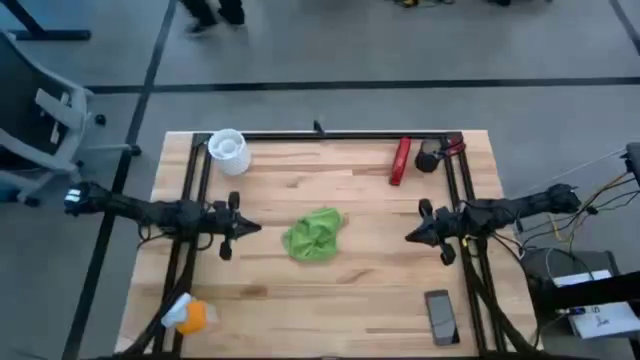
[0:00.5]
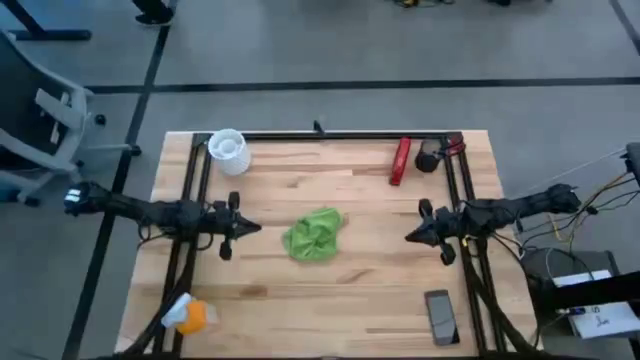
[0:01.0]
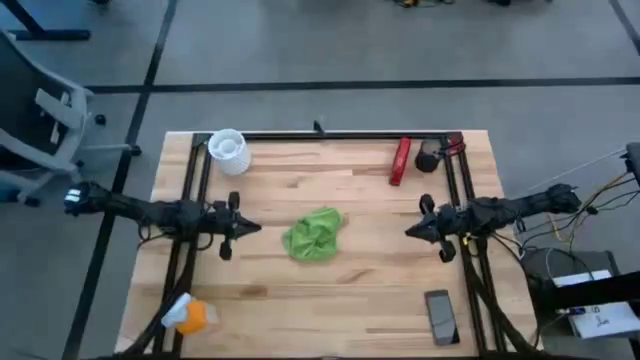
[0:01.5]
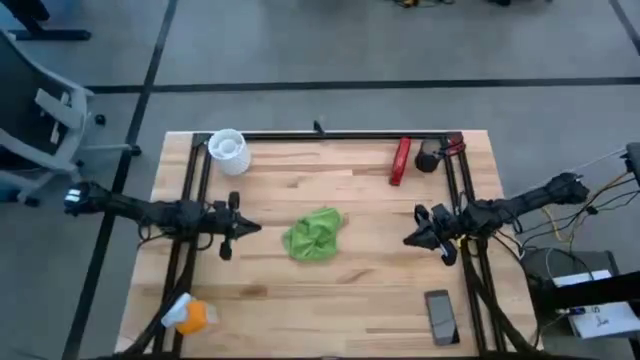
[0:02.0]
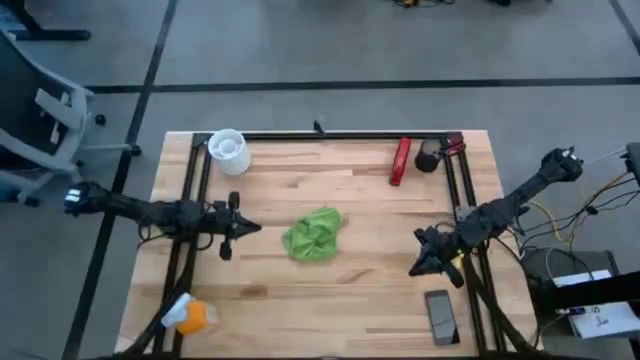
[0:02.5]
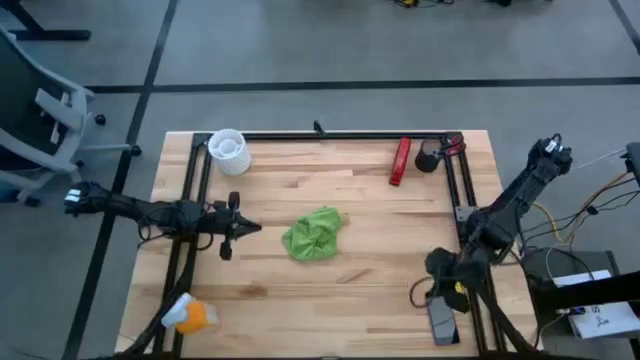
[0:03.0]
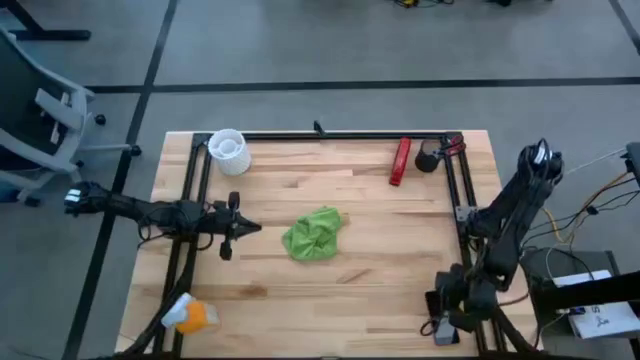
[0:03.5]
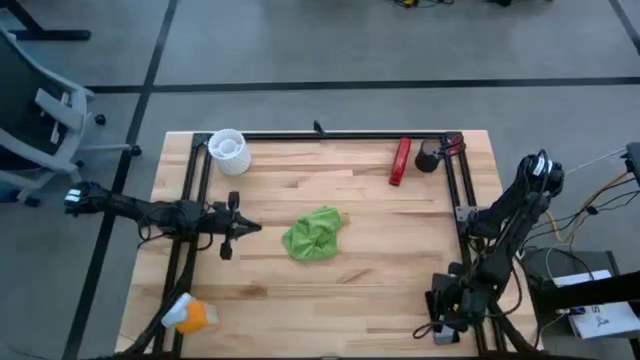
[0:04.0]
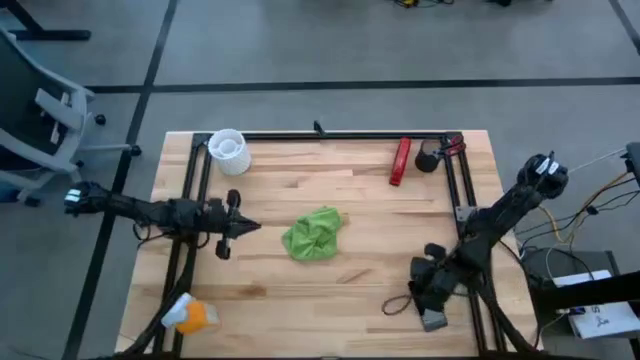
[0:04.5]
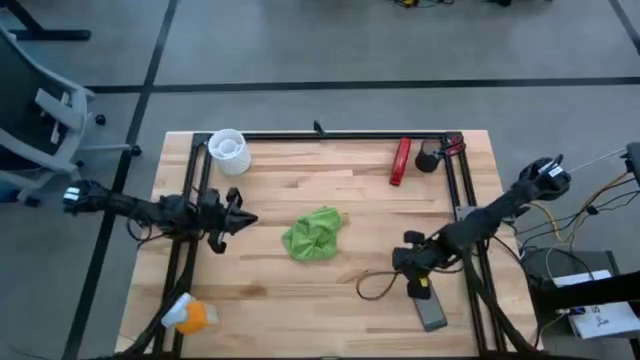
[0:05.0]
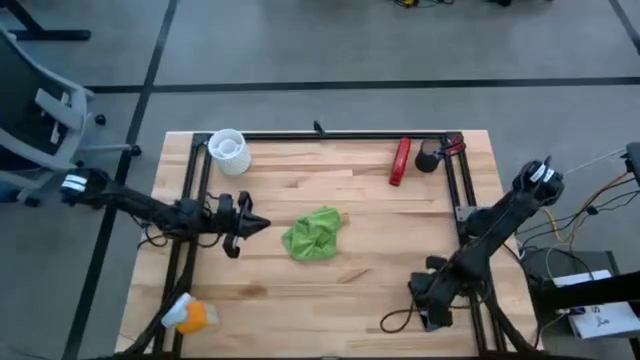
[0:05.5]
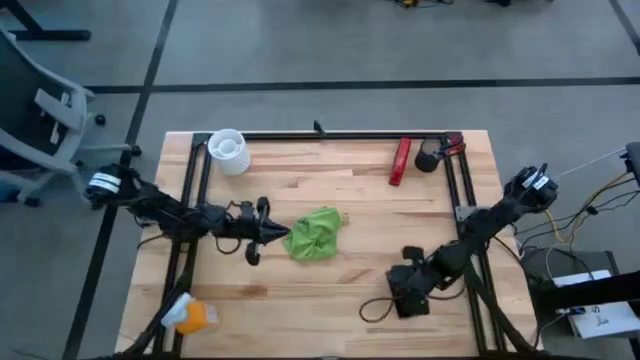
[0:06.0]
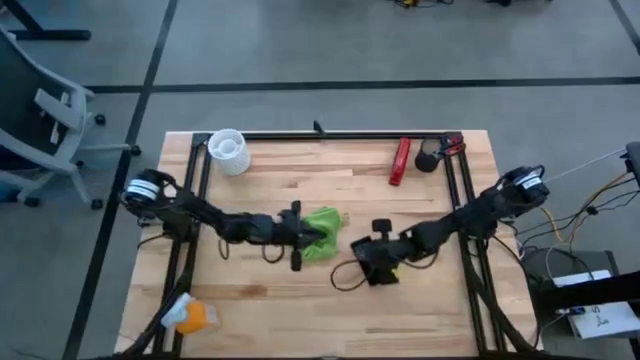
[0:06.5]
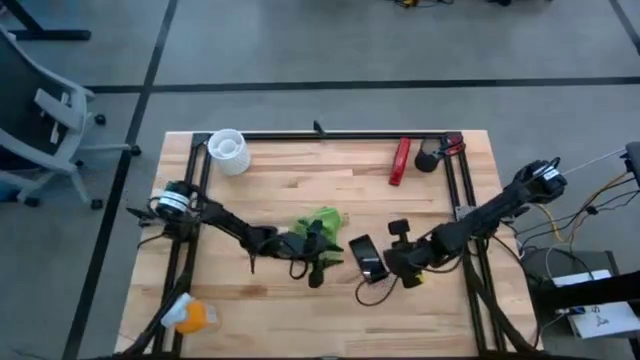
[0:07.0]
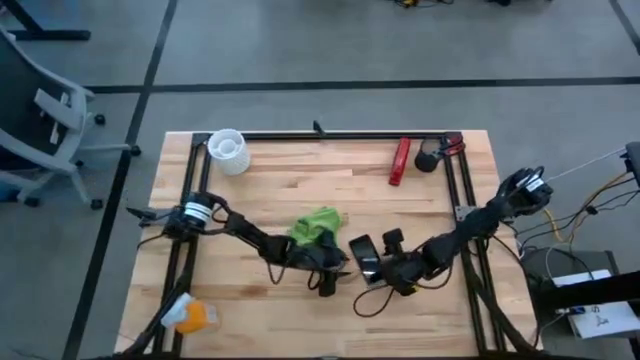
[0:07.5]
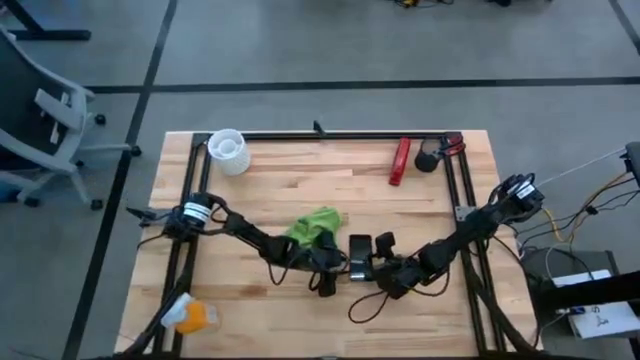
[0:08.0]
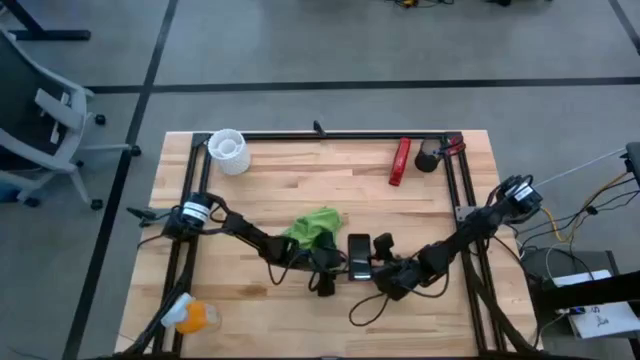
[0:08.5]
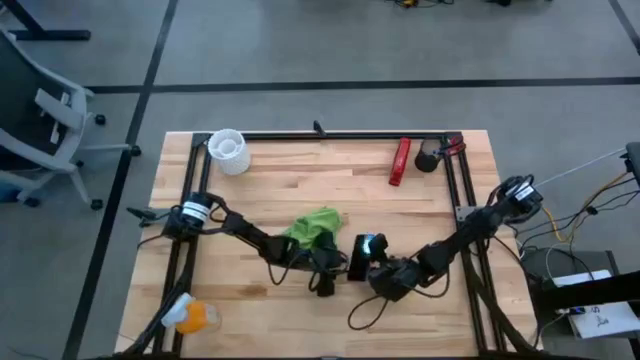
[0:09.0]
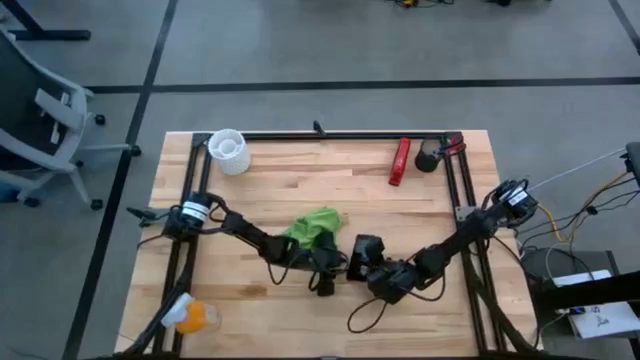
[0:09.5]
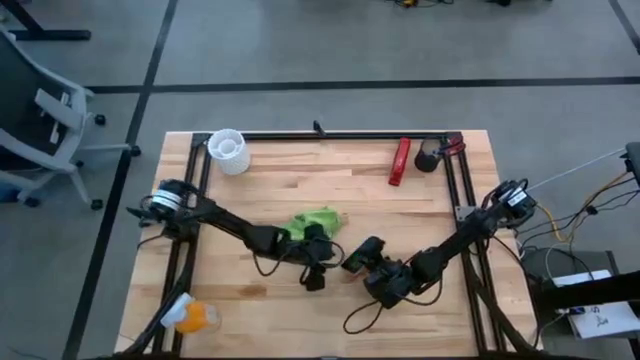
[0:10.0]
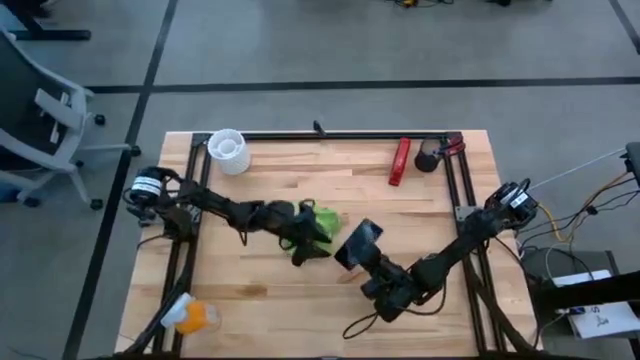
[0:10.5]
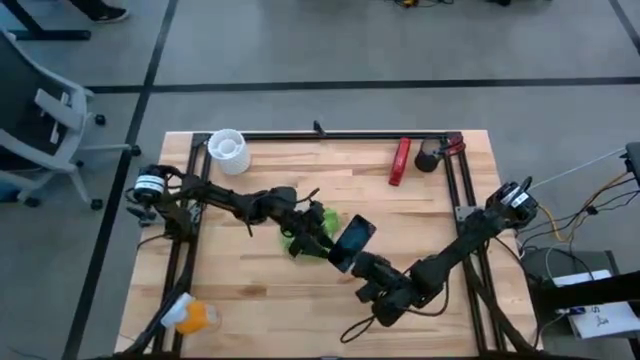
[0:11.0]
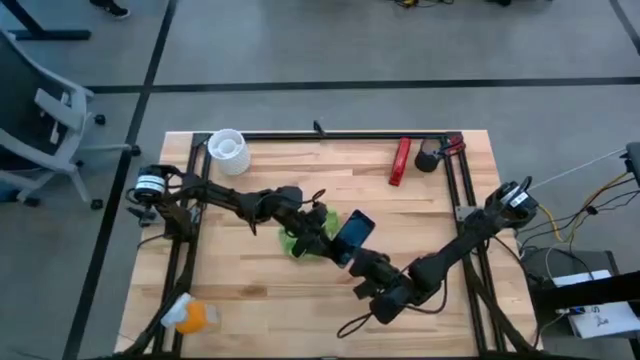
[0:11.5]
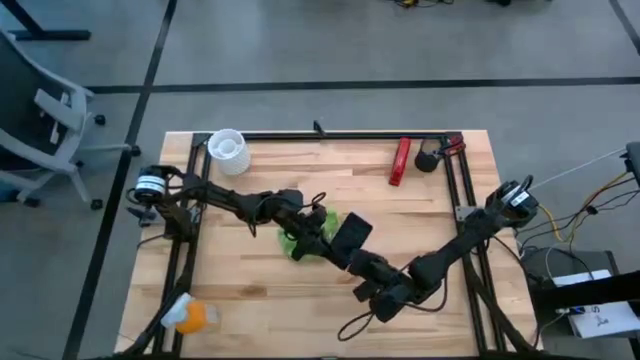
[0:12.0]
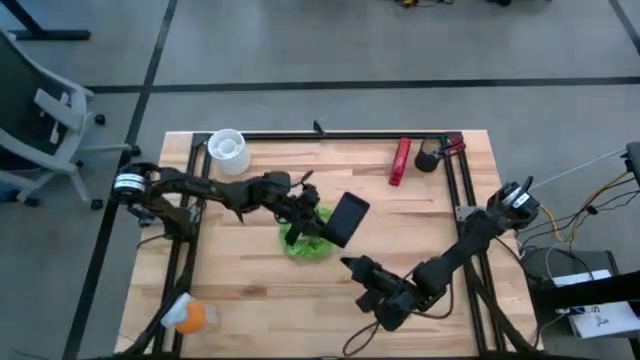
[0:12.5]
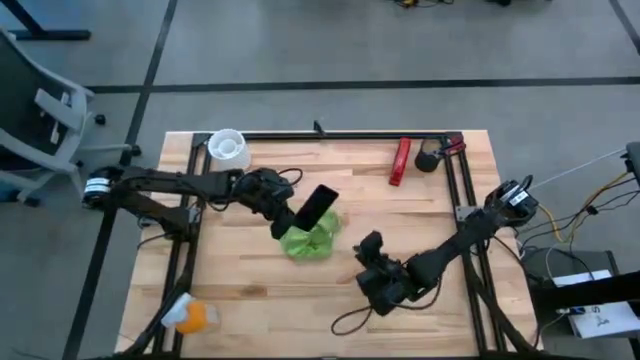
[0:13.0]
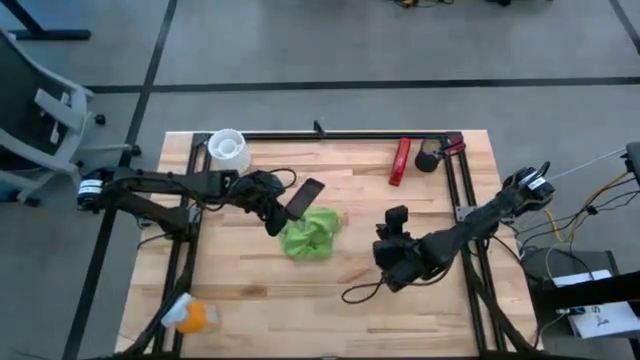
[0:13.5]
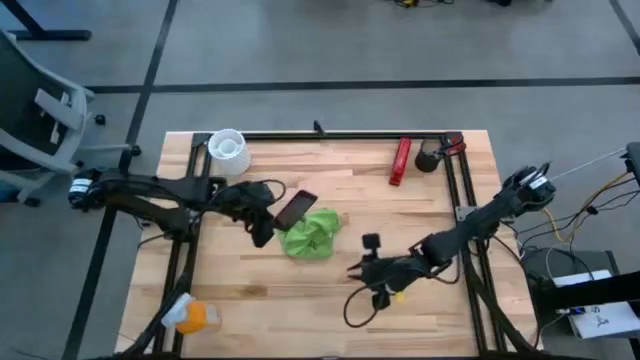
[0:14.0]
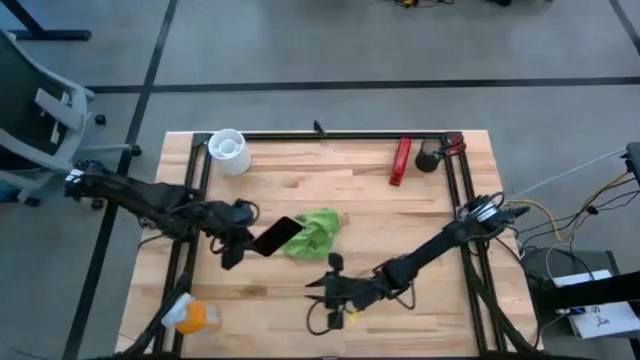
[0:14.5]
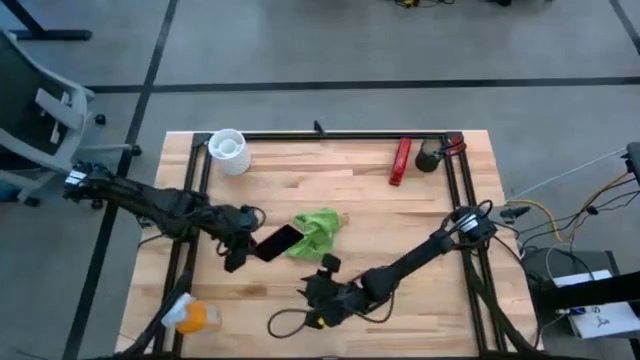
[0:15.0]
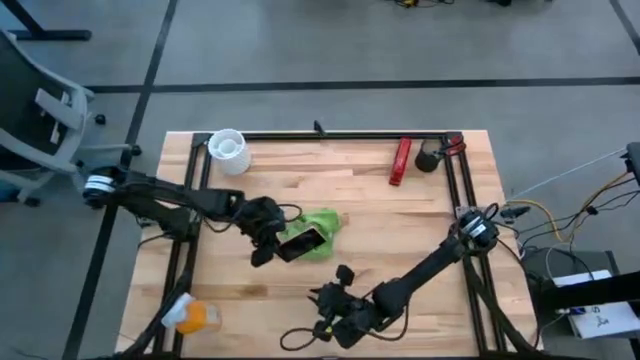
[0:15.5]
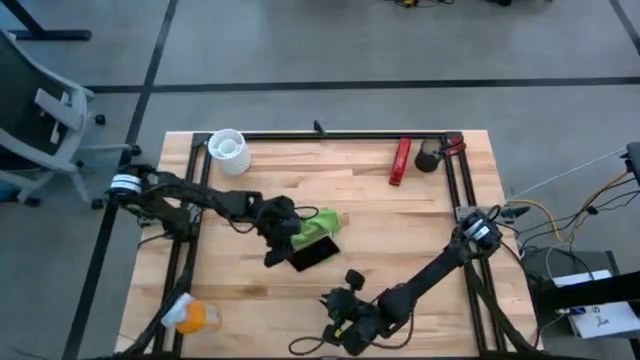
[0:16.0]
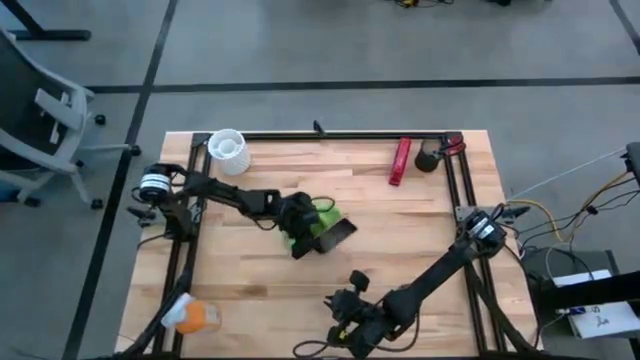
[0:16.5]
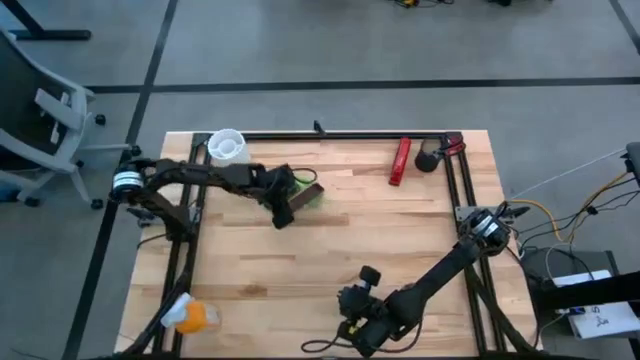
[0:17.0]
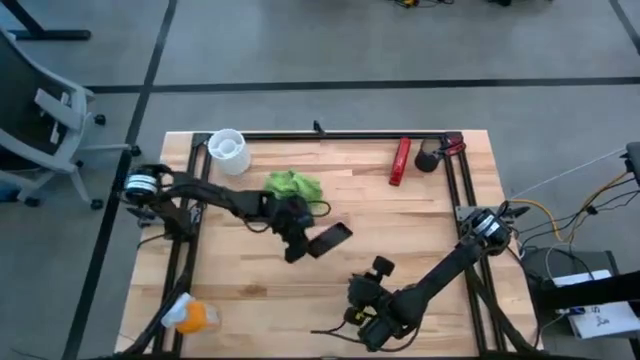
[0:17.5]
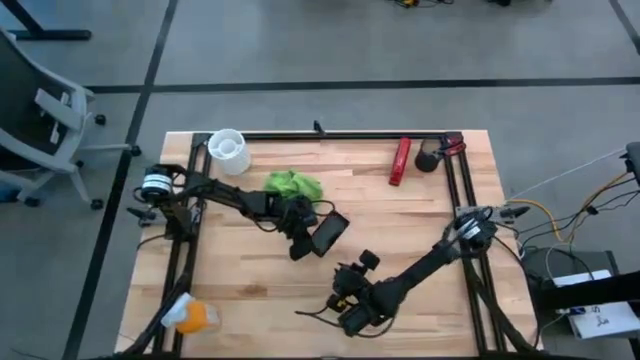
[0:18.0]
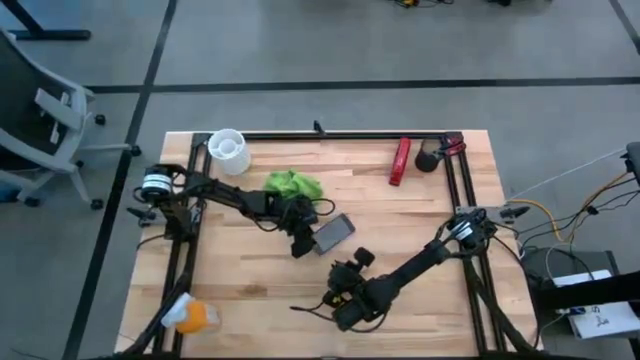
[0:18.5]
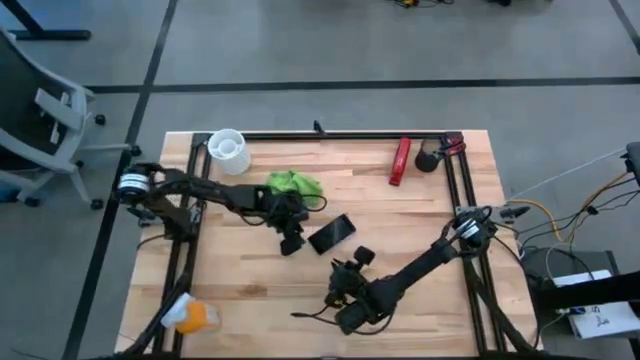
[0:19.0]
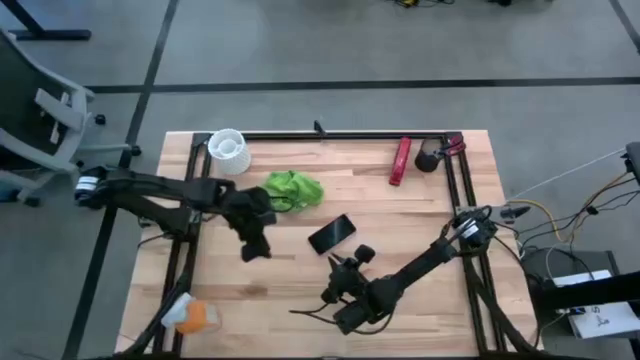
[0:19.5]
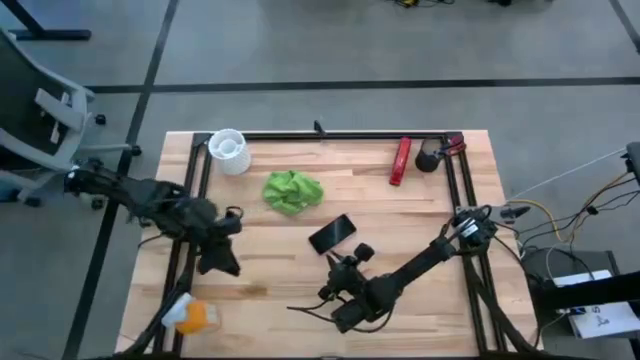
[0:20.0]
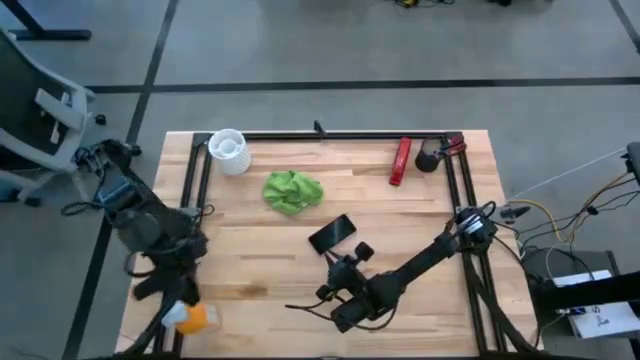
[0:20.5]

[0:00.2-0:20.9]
Task: Apply microfiber cloth
Spray the front and back of the cellphone using the cleaning bottle
